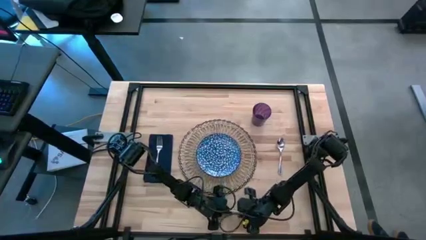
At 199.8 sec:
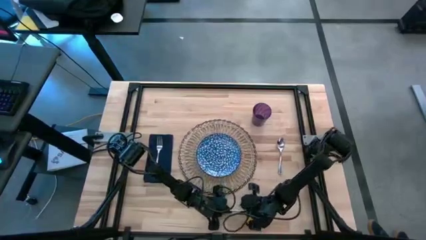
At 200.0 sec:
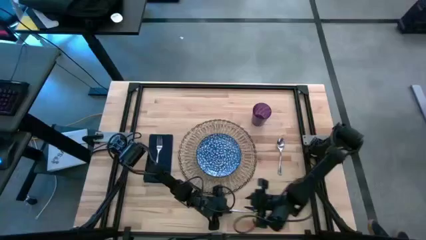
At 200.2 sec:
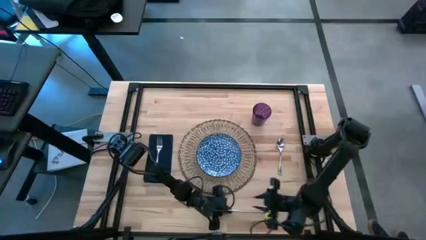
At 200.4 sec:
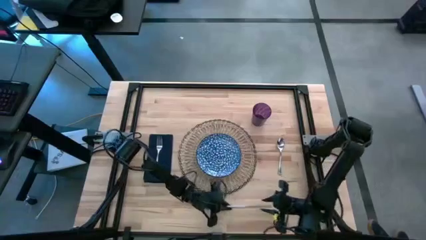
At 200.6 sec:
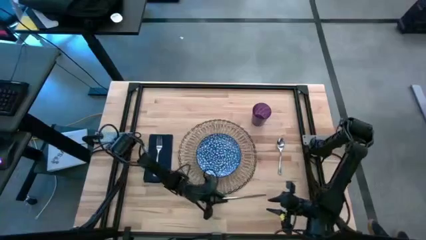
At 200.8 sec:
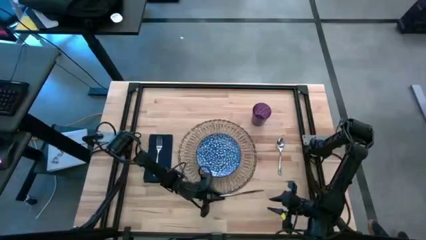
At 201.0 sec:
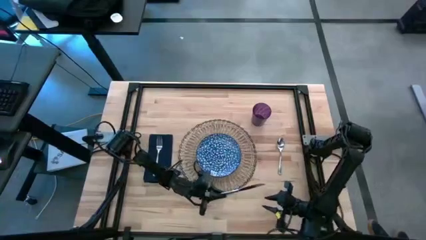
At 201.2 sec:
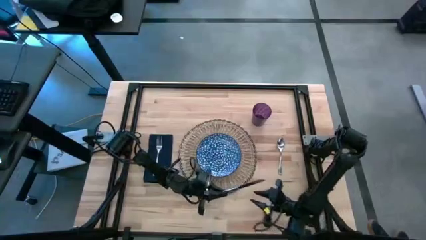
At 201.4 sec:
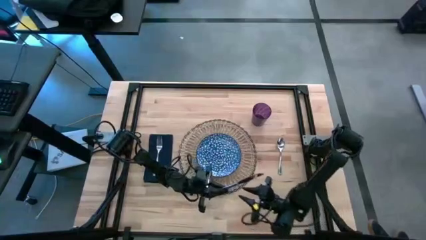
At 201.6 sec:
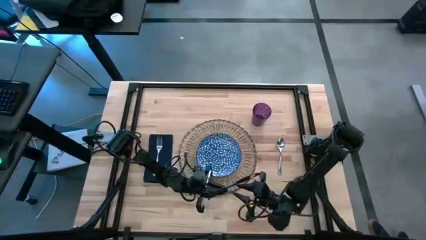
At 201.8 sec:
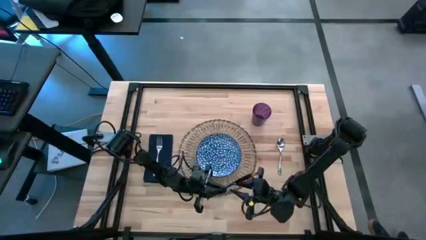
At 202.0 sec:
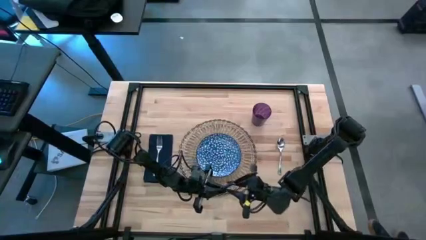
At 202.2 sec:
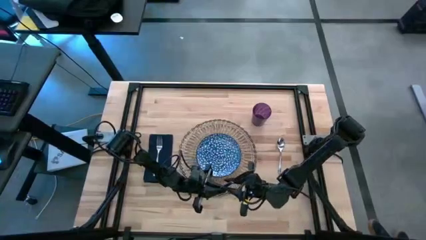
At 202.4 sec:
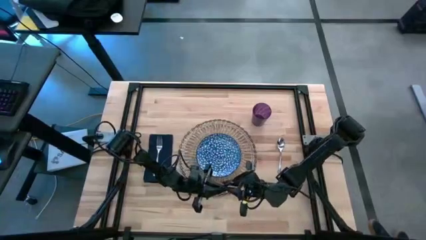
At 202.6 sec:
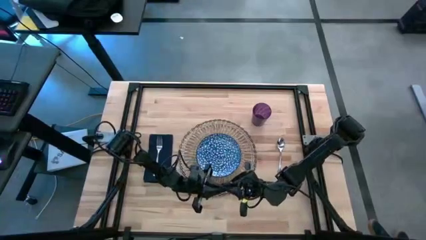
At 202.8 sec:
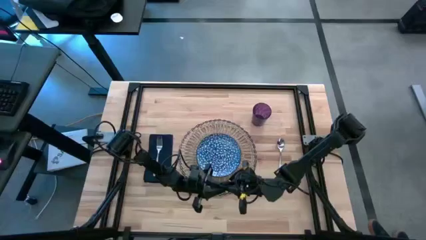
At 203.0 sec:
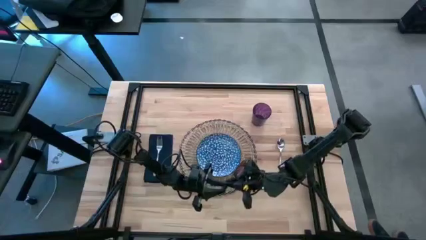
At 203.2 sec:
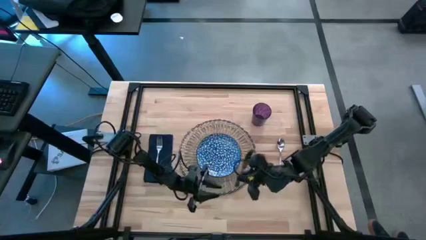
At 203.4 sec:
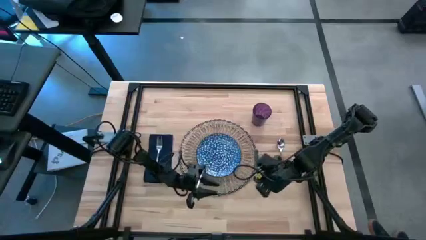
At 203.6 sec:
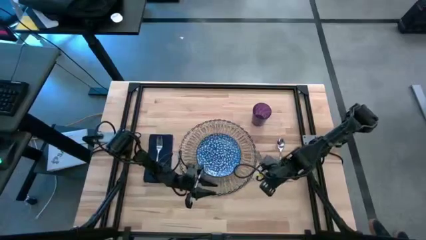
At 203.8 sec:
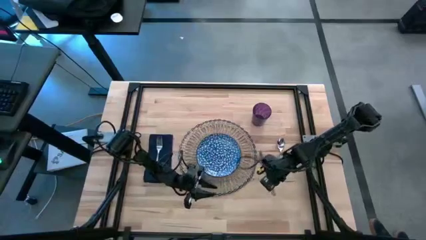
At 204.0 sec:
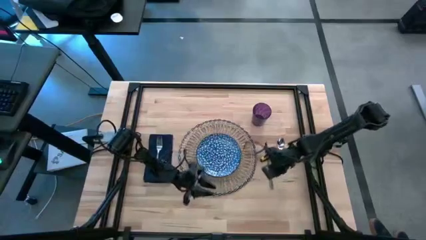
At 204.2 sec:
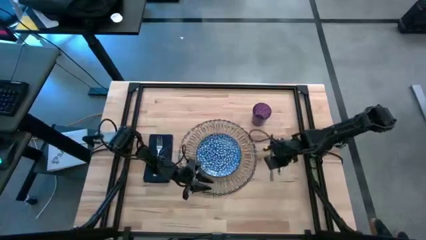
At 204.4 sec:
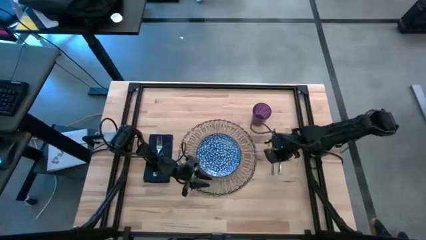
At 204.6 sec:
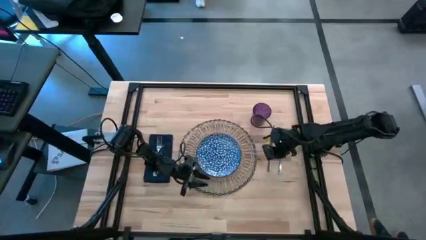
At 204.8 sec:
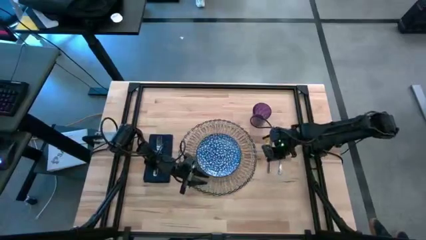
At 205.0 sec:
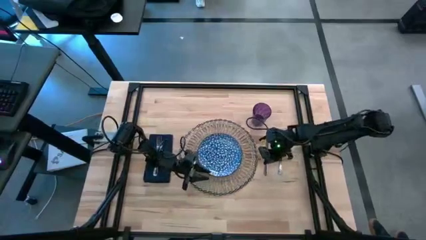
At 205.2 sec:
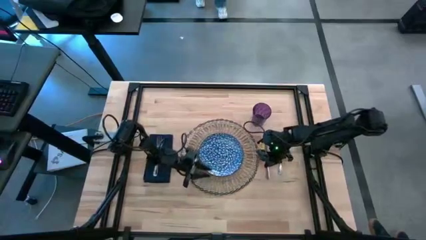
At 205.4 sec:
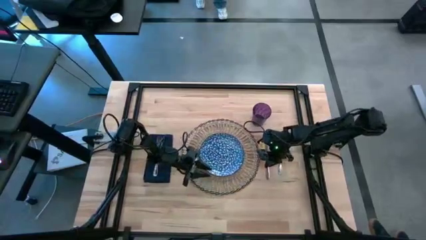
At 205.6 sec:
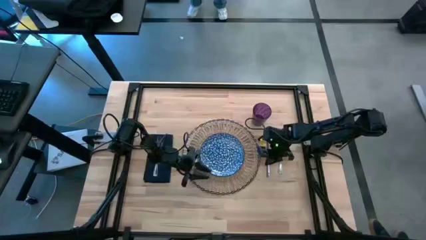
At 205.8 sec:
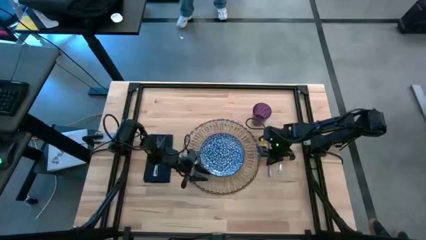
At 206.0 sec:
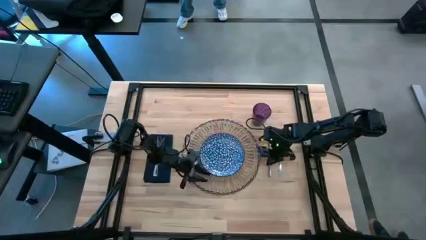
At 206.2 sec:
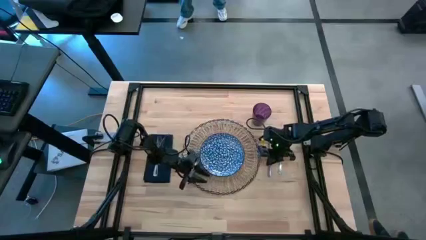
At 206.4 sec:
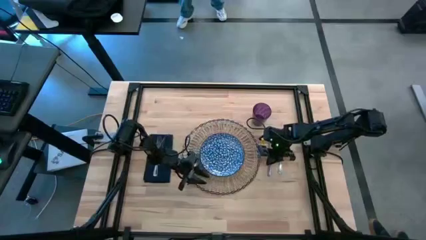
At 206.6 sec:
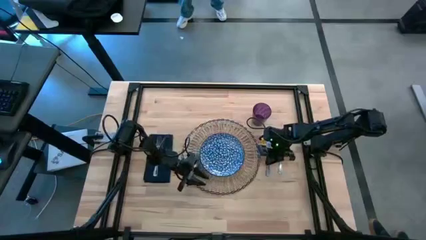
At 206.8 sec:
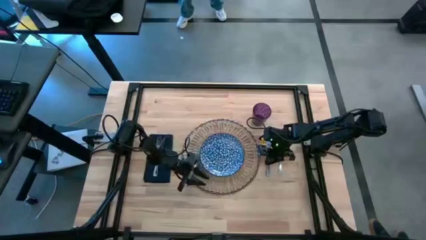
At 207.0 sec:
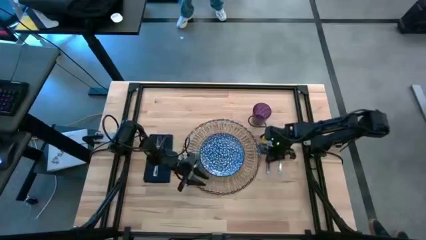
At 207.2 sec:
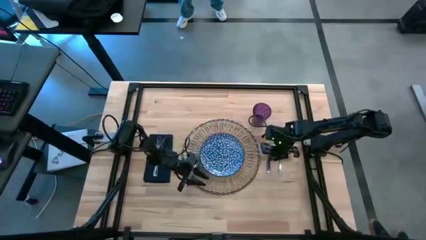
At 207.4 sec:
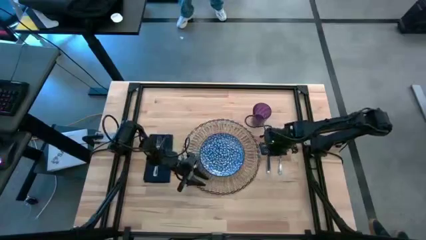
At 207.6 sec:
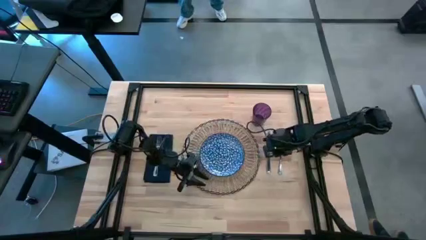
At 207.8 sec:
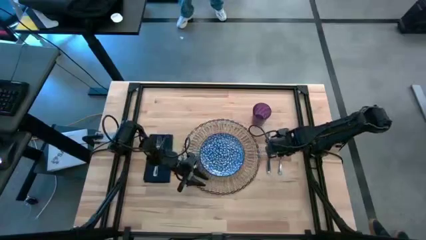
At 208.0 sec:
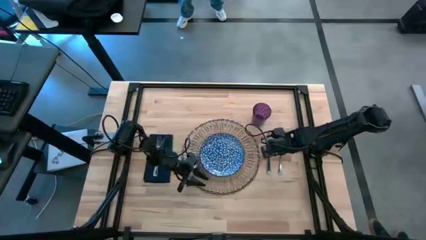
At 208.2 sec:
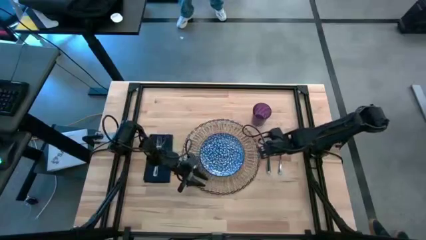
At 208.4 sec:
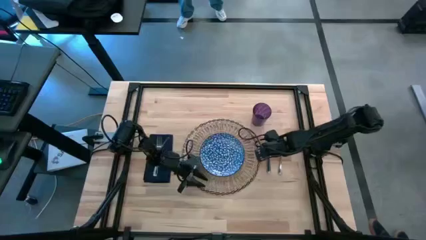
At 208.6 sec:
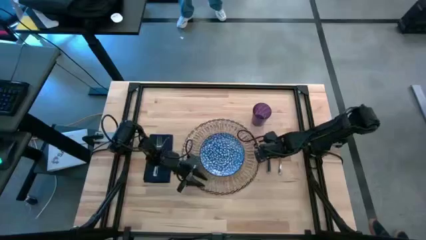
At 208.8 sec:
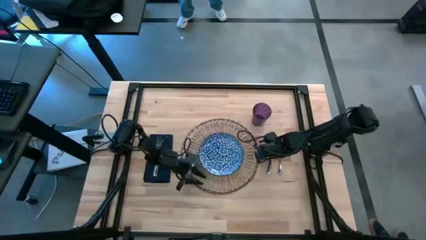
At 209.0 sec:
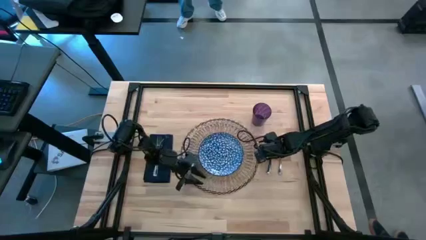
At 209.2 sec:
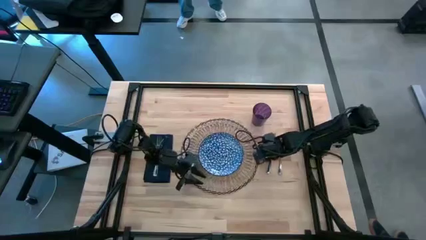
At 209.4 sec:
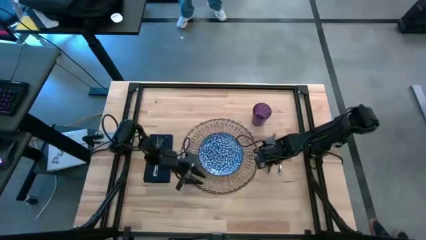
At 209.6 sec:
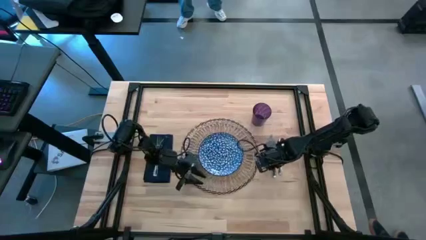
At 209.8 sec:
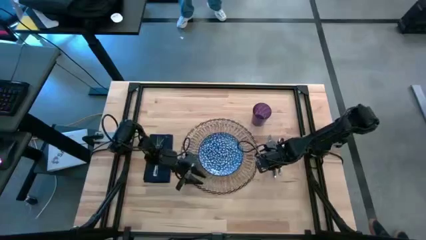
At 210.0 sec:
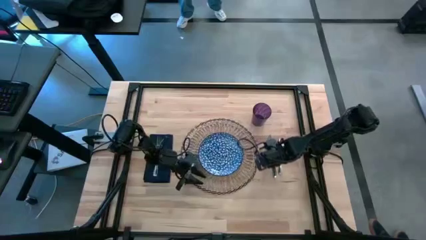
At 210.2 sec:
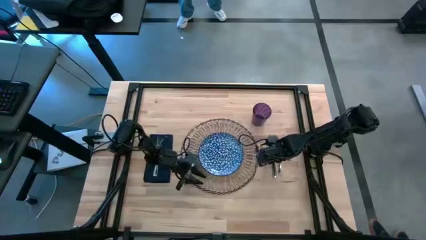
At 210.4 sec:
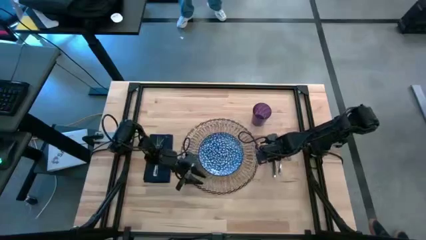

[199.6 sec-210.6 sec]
Task: Set table place
Move the silver knife to the left of the silver spoon on the table

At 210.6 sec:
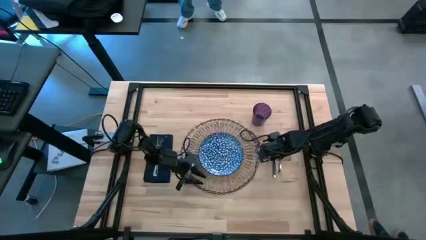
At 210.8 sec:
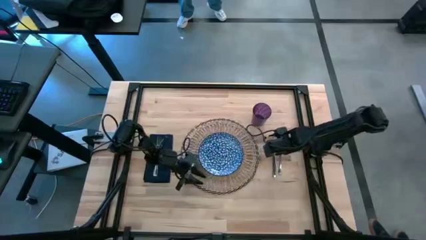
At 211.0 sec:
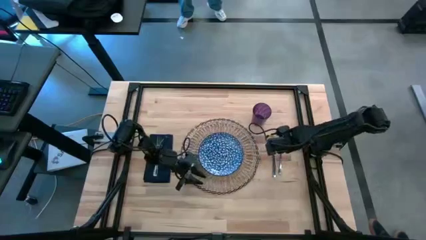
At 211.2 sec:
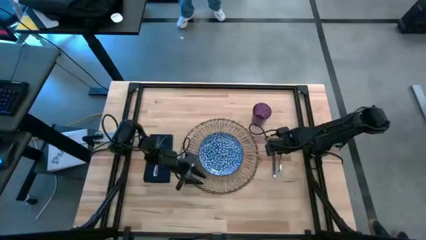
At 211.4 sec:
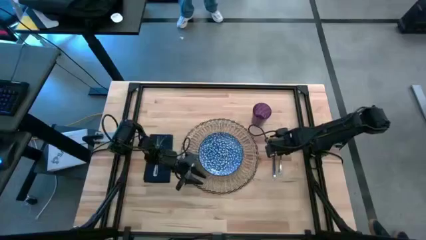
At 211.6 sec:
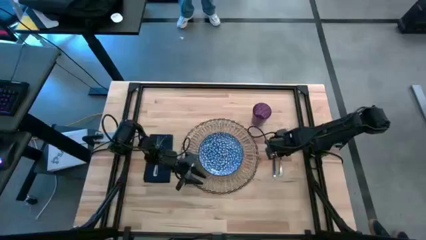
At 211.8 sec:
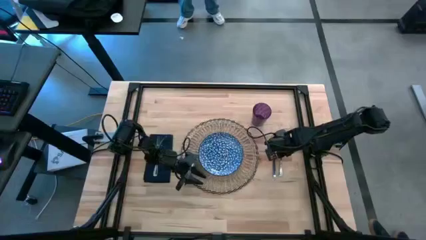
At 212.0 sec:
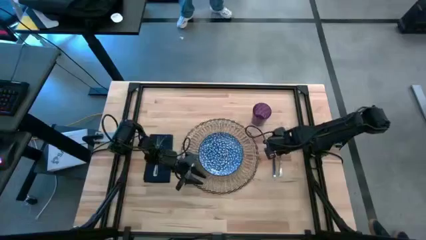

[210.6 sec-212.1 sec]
Adjust the silver spoon

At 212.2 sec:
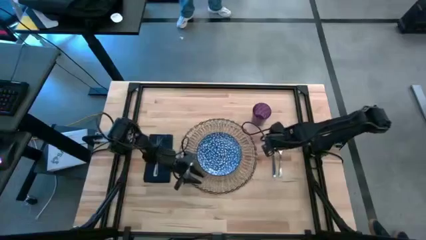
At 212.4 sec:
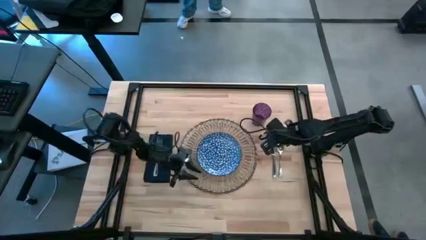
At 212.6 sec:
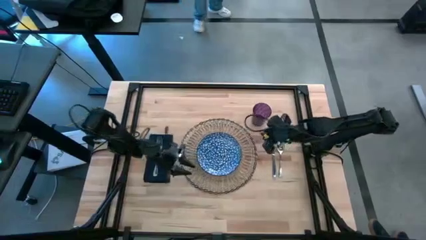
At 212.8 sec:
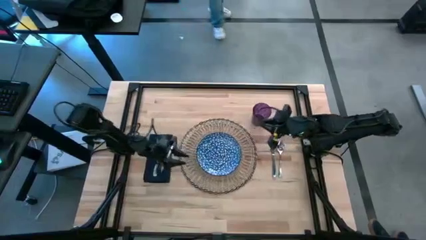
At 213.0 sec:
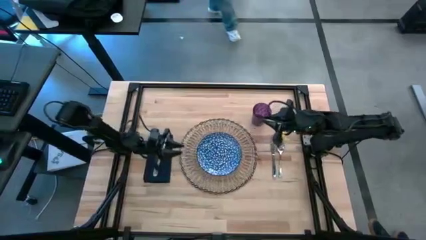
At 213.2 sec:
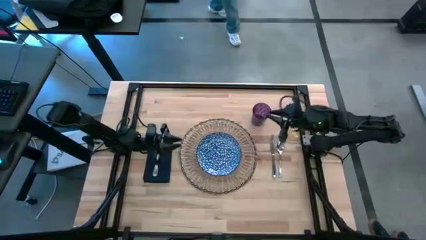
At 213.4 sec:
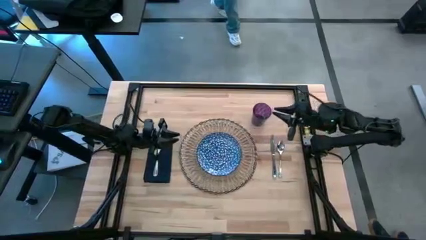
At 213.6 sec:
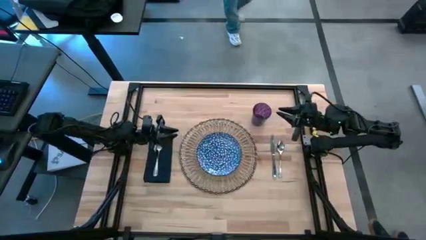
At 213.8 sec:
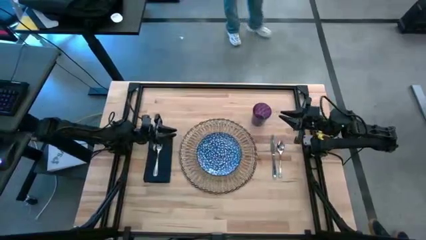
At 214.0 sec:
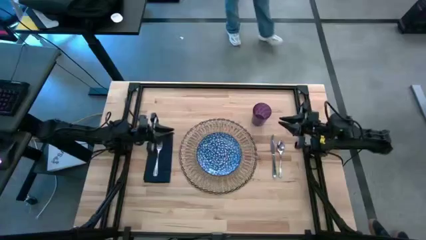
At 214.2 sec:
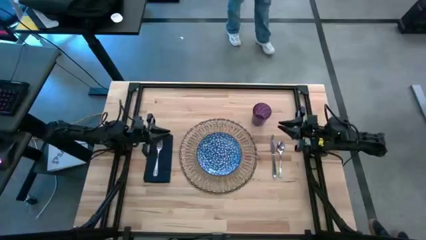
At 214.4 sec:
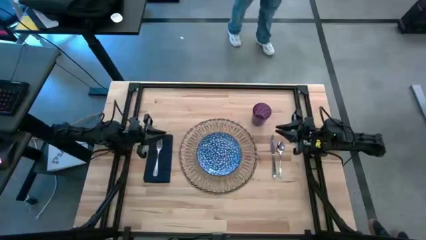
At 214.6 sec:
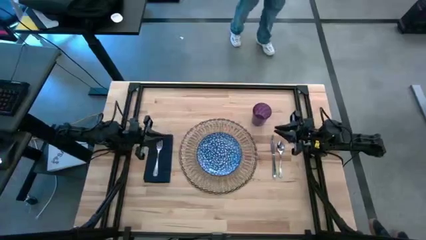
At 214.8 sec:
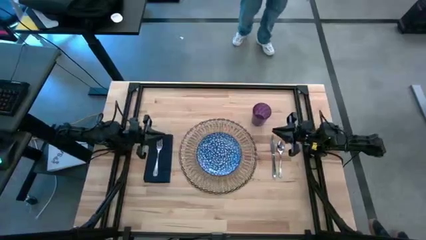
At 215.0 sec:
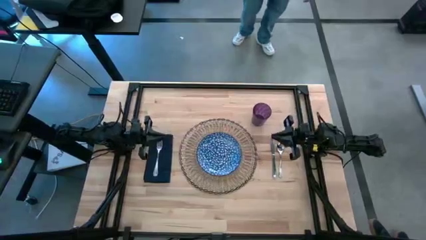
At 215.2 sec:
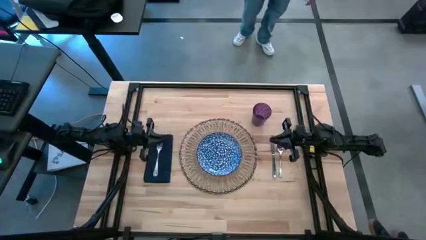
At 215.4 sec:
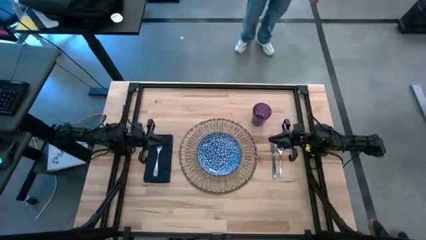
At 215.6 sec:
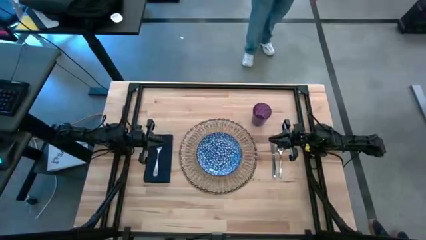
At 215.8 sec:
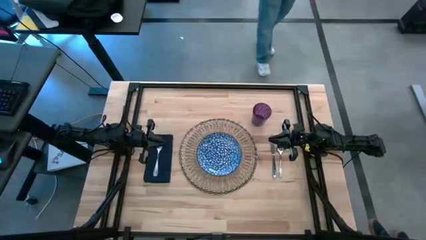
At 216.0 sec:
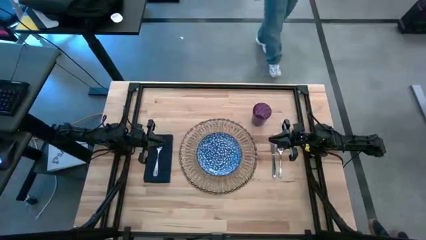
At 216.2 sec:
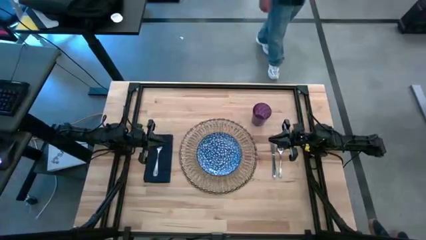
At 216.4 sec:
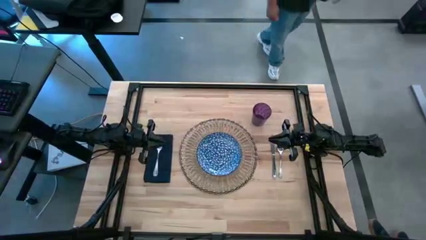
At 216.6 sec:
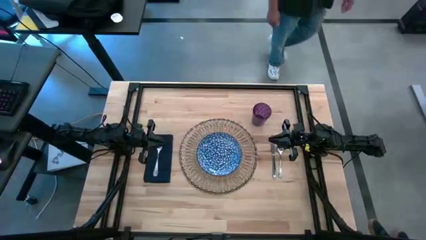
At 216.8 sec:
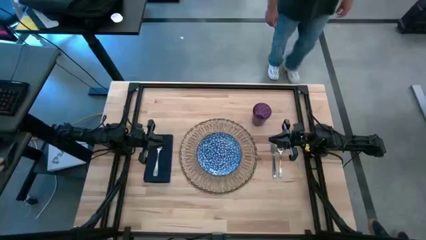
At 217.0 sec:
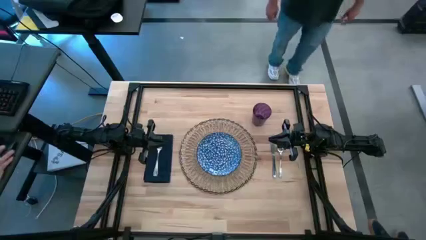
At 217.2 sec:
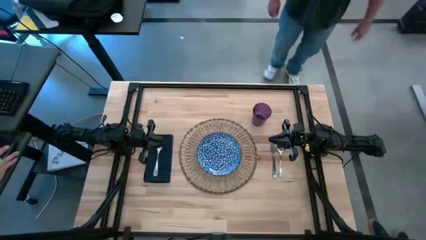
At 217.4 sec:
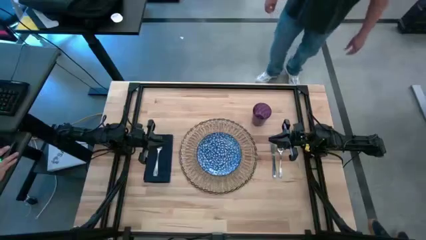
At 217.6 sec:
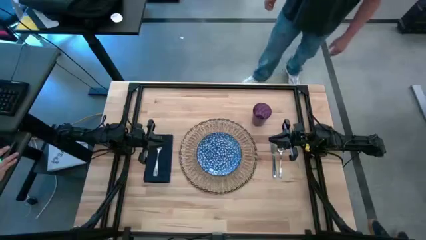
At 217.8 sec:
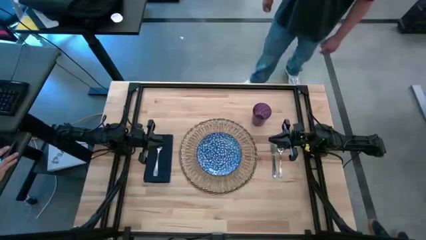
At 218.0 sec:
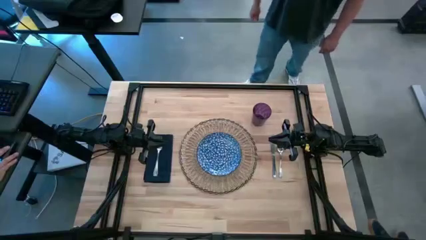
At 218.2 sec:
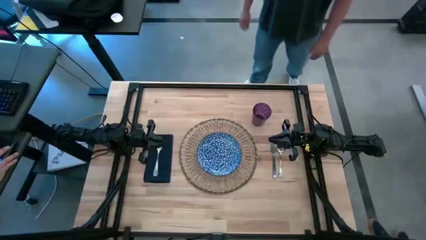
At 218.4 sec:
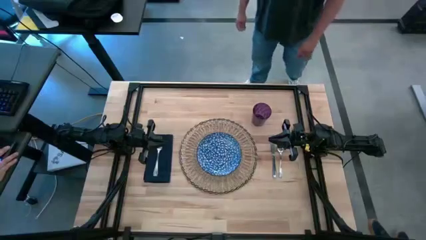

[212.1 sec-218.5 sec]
Return to Home Position
